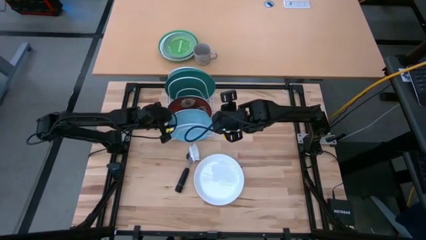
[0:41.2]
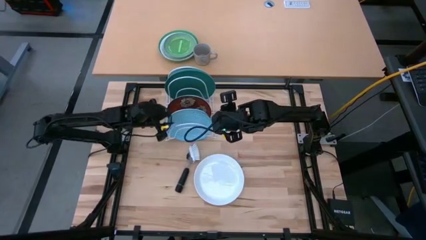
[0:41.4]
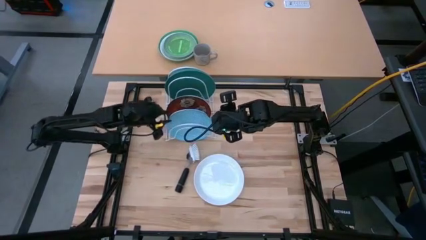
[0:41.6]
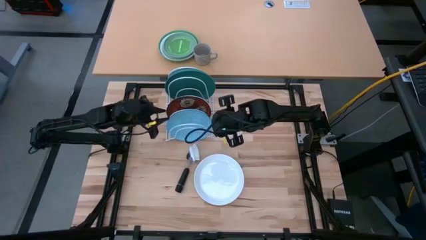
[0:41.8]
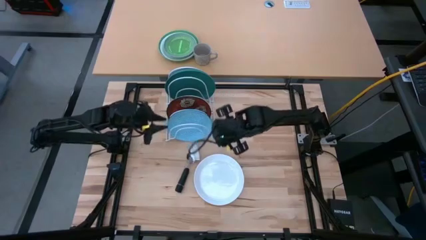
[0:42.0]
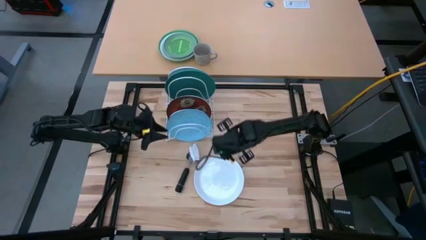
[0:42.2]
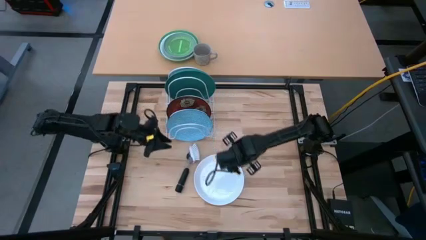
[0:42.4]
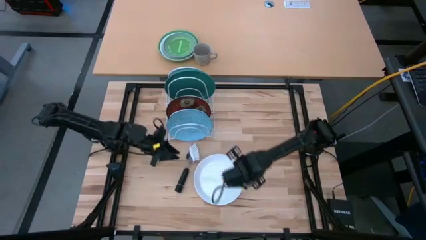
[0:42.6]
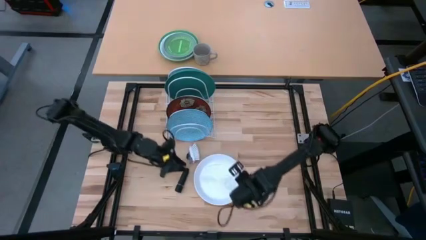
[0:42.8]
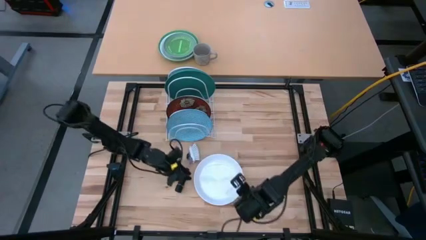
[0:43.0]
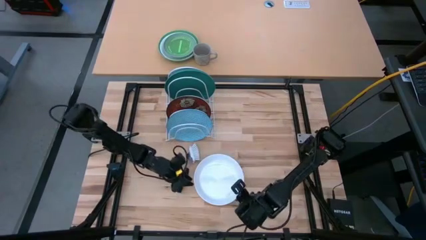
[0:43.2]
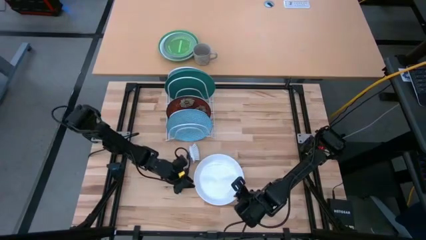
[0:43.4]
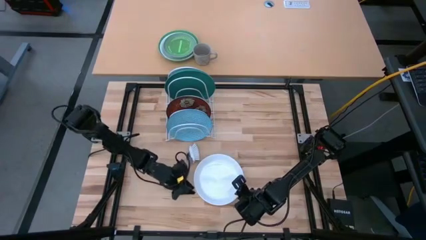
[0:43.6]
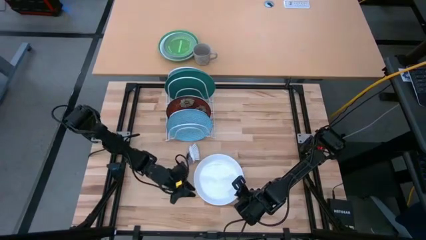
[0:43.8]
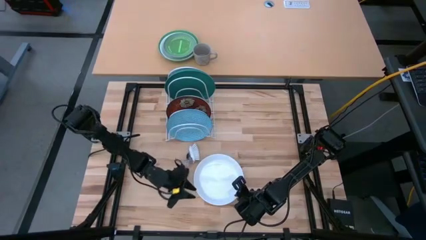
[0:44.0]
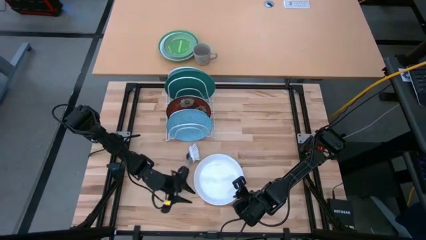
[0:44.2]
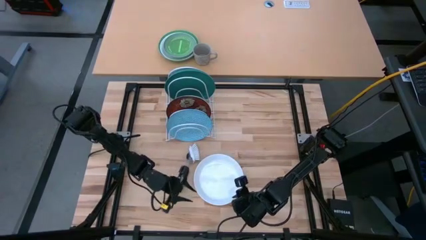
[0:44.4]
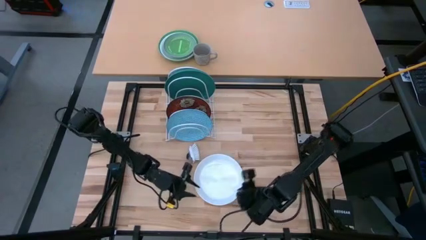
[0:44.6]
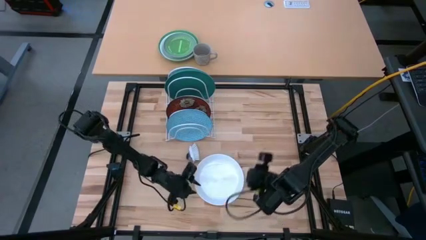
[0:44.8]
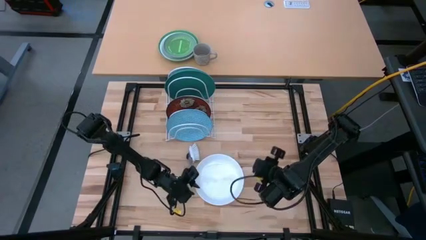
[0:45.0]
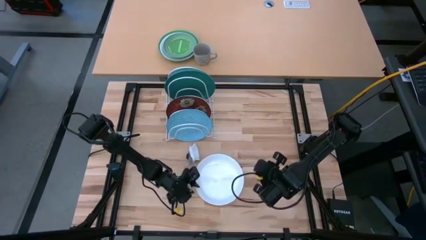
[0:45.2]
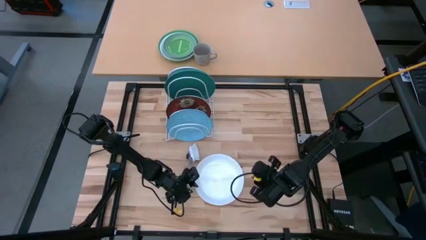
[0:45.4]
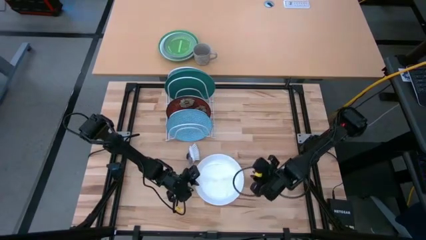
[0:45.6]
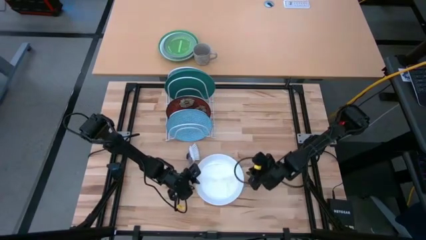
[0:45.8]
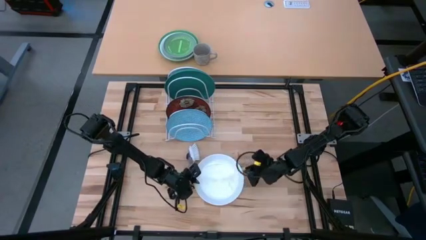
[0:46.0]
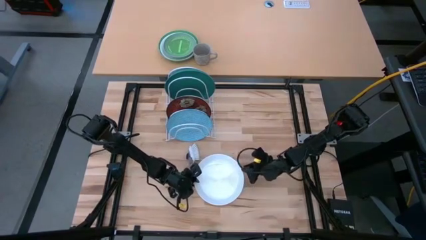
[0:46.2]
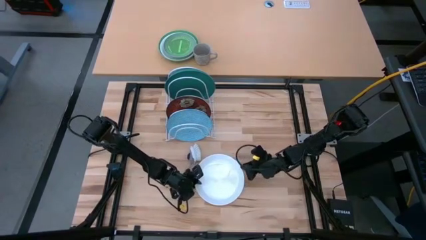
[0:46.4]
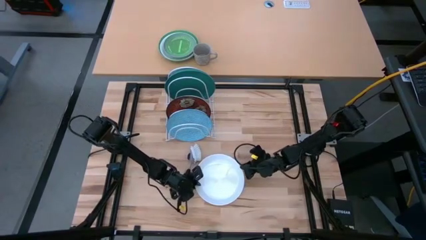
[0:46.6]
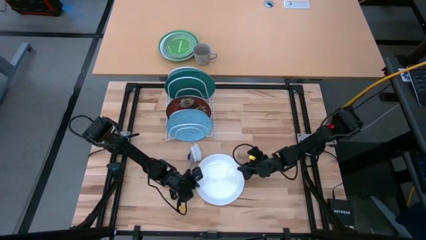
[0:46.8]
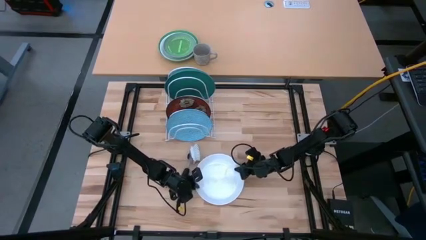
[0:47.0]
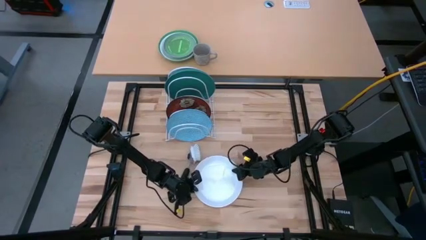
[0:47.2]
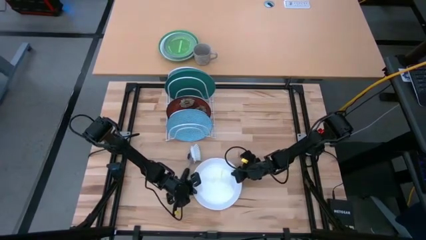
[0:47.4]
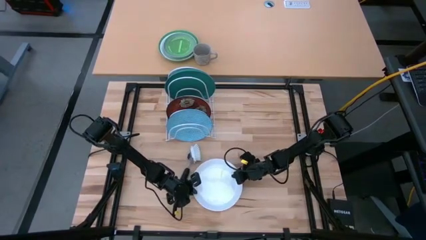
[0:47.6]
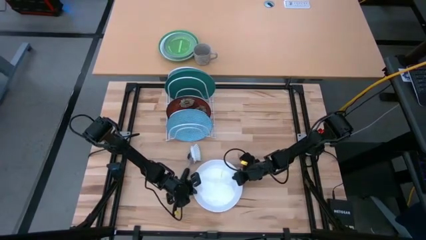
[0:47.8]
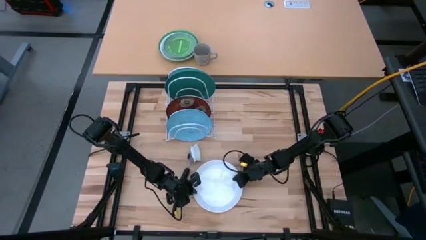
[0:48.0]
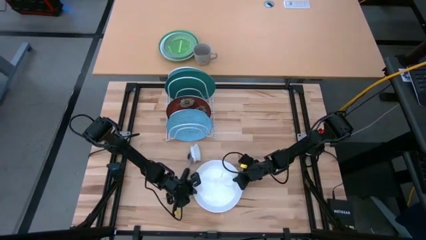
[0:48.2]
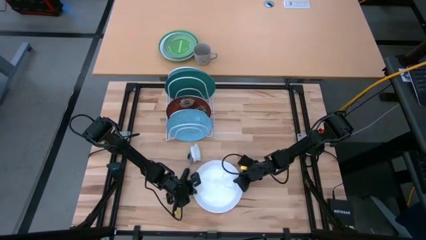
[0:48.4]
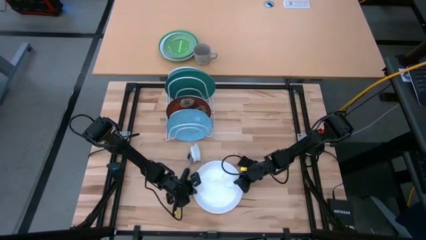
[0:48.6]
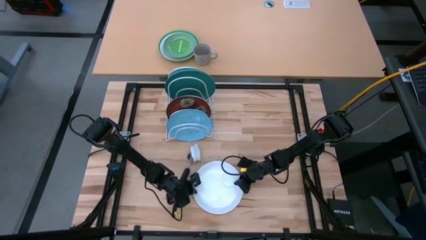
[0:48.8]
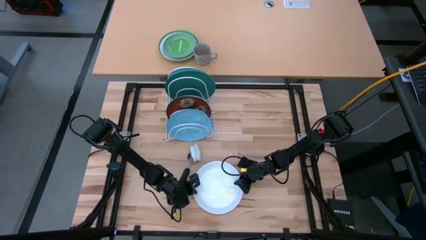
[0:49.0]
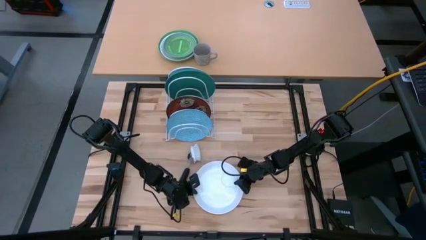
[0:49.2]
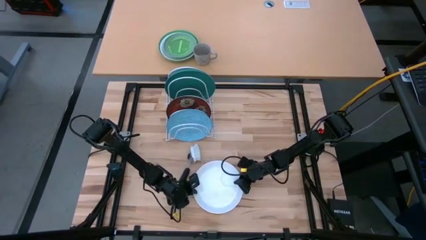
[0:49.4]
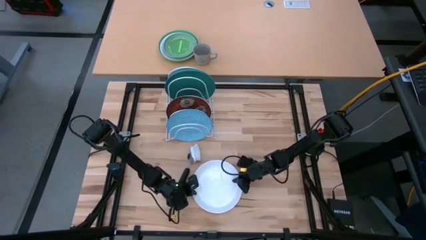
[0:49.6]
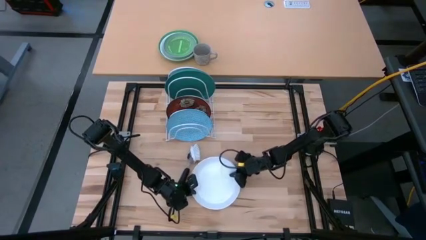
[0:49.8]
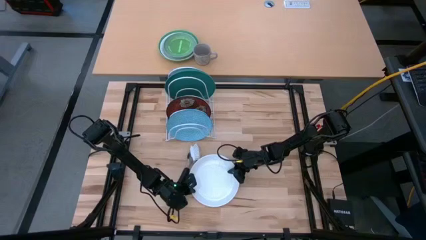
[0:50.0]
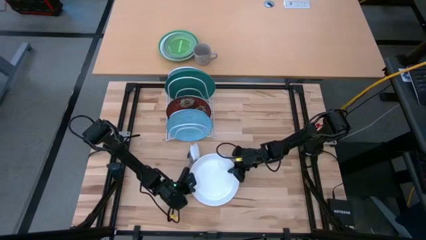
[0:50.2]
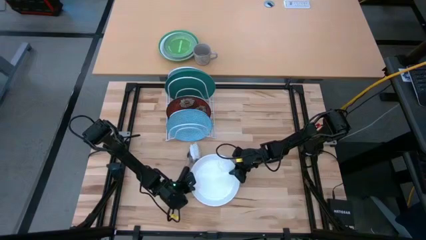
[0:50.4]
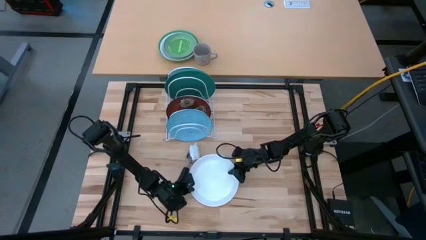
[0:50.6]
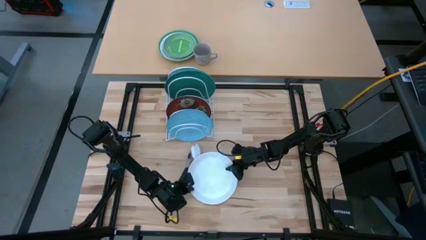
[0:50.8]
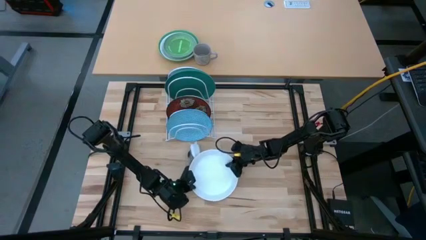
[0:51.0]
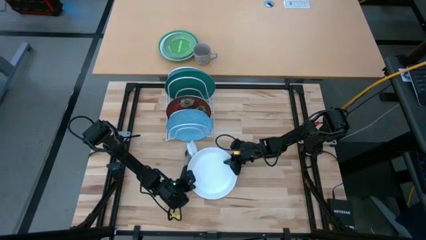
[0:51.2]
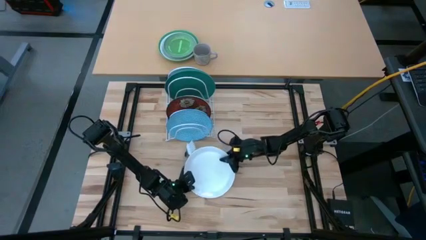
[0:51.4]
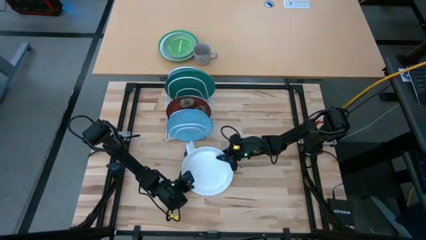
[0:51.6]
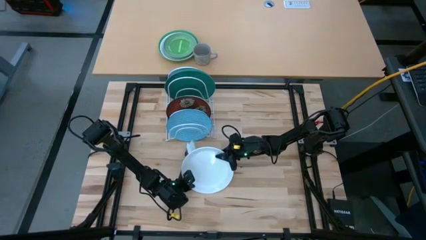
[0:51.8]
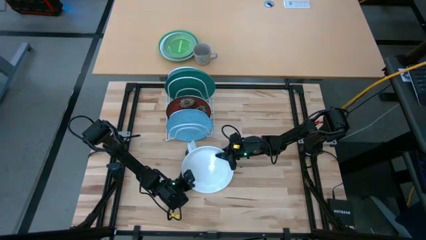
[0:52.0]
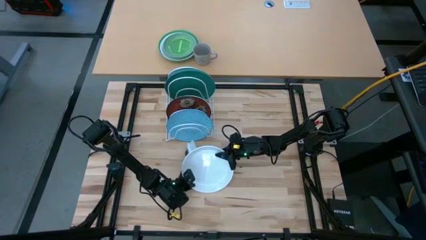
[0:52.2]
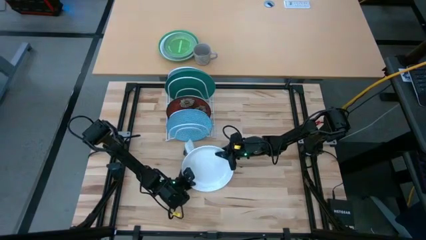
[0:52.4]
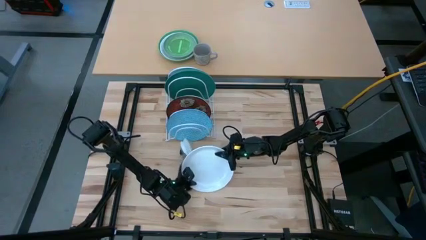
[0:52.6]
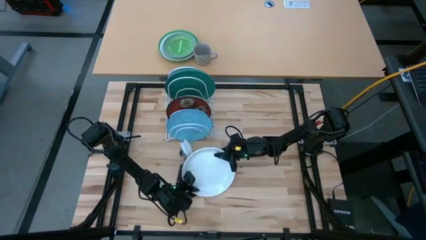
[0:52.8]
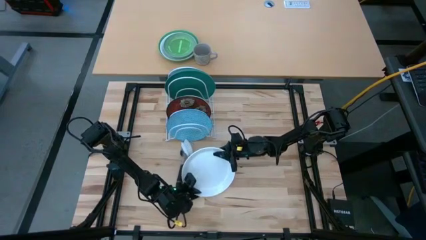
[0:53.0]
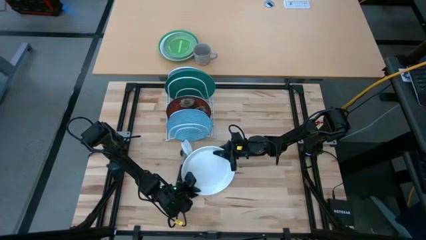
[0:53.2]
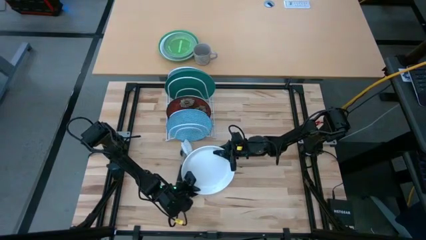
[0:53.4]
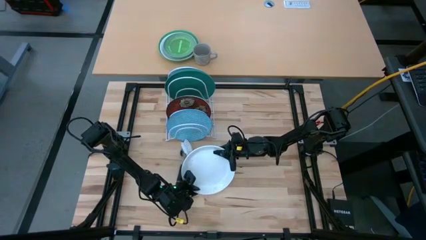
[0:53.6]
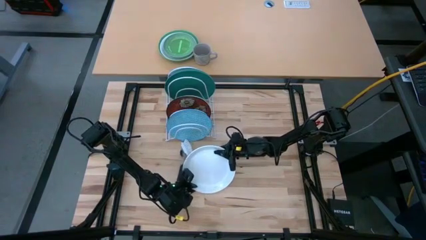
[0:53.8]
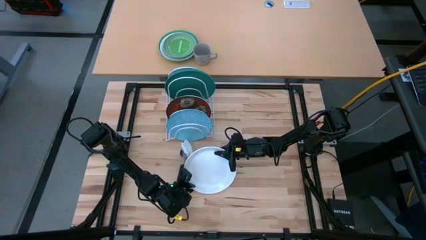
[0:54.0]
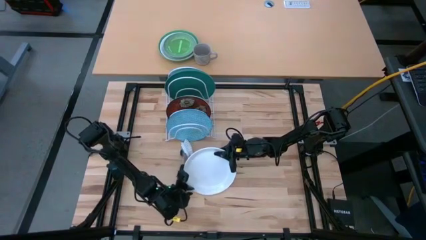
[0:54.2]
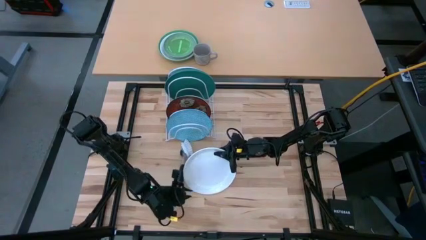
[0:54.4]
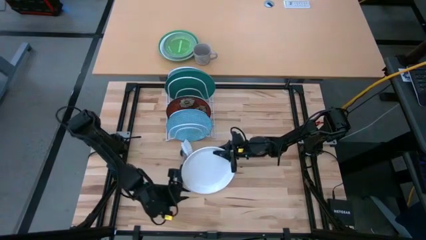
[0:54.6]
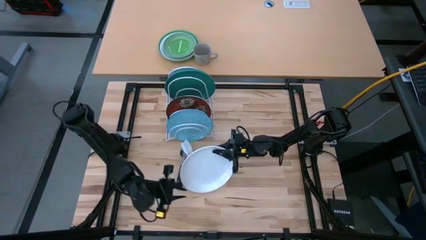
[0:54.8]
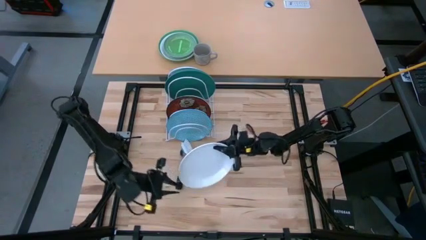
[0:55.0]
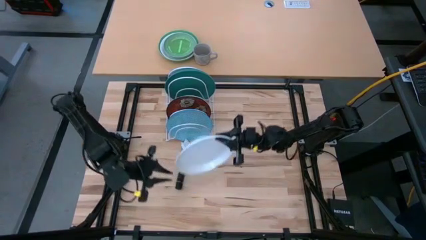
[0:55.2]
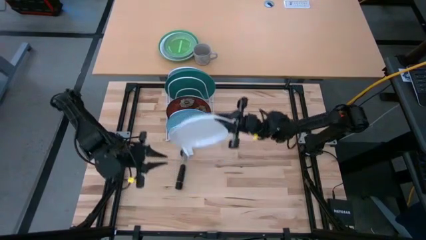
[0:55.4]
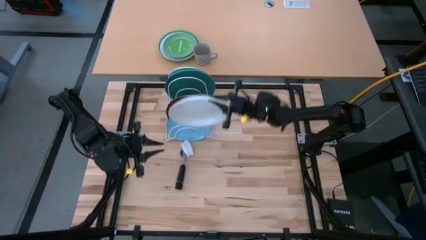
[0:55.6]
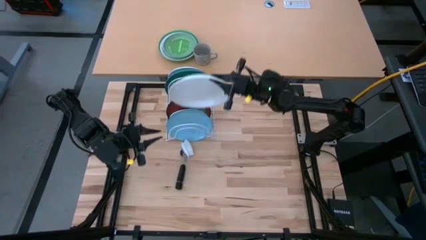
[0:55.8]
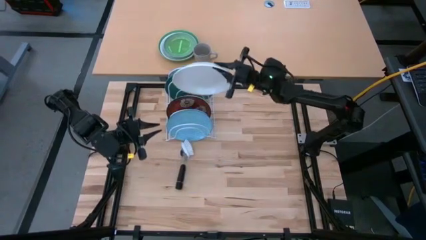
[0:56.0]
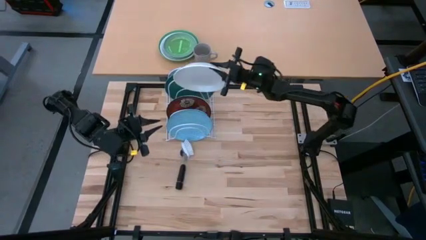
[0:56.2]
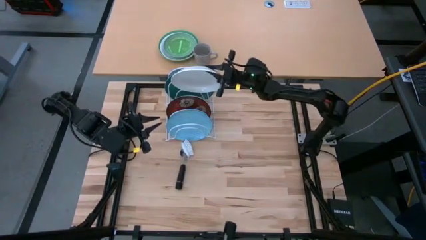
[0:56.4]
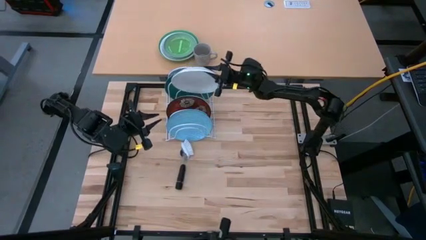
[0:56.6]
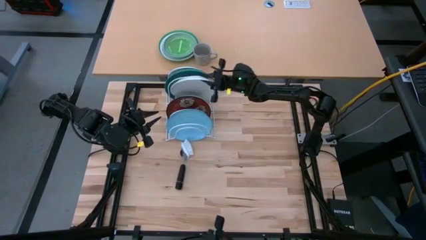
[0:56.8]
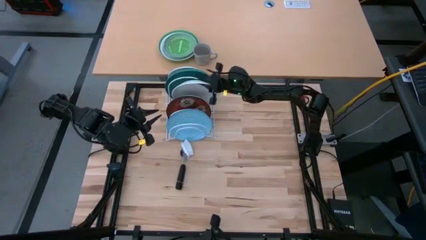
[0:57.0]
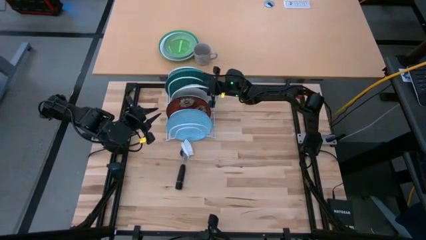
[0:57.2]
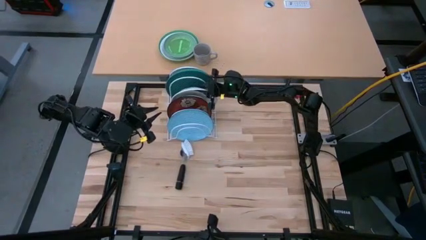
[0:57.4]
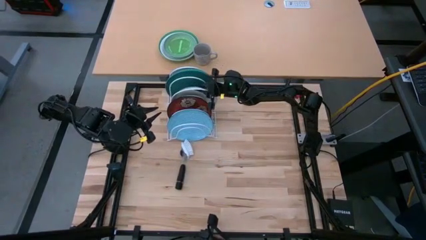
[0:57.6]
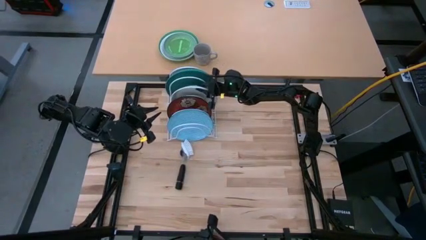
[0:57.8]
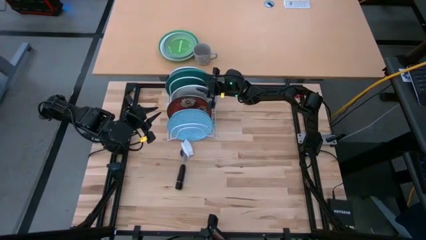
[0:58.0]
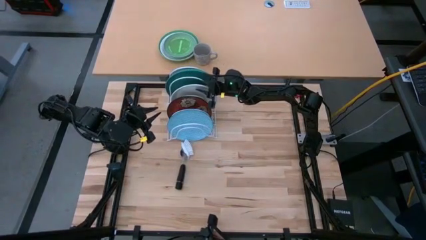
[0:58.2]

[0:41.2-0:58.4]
Task: Sort dishes
Put the white plate into the white dish rack
